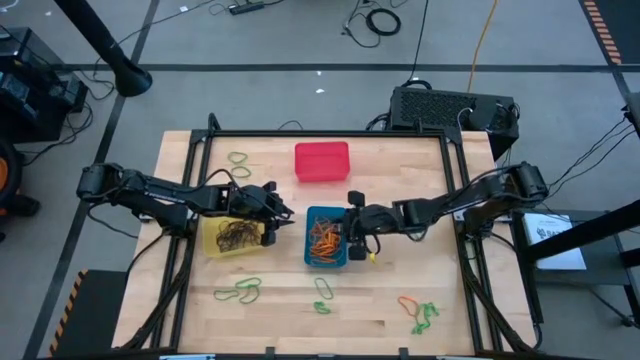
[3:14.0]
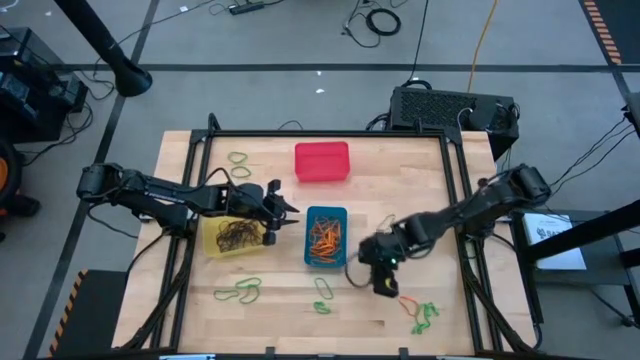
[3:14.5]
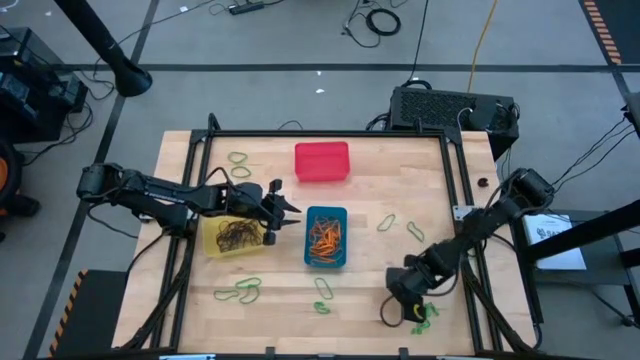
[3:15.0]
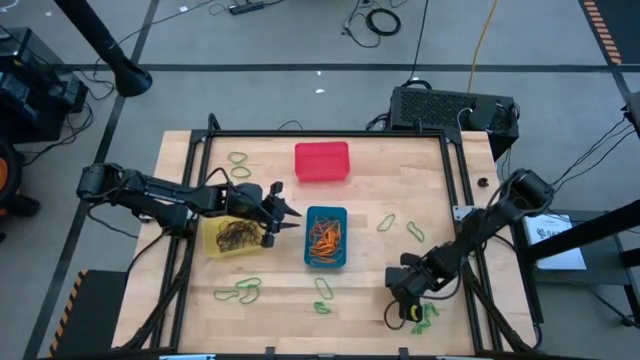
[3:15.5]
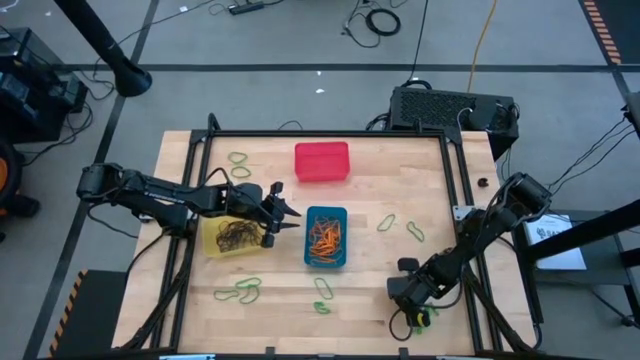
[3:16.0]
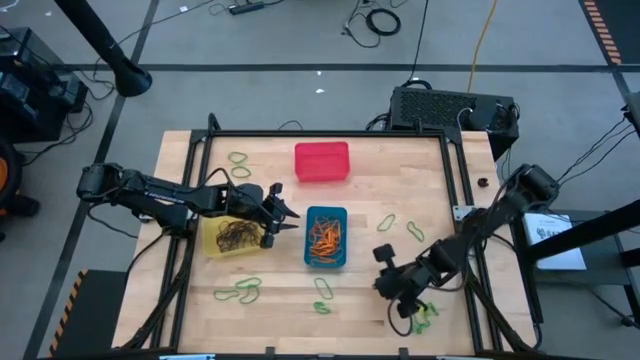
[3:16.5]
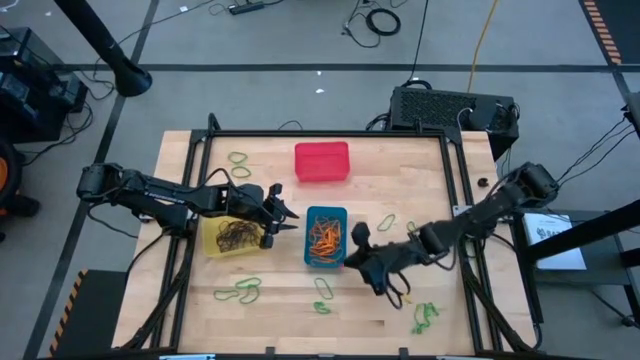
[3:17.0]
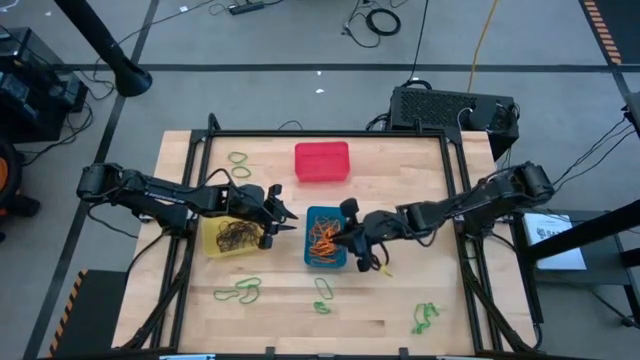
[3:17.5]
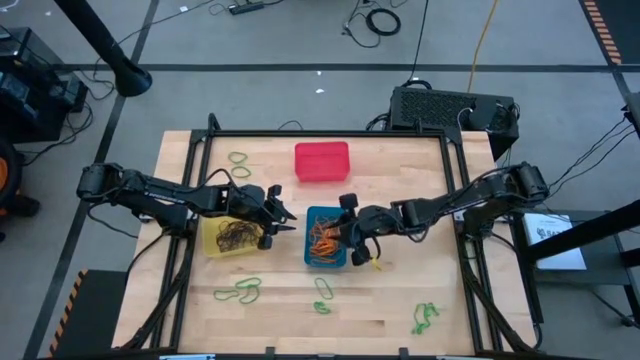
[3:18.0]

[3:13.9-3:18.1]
Task: Sort rubber bands into baskets
Put the orange rubber band into the blue bin

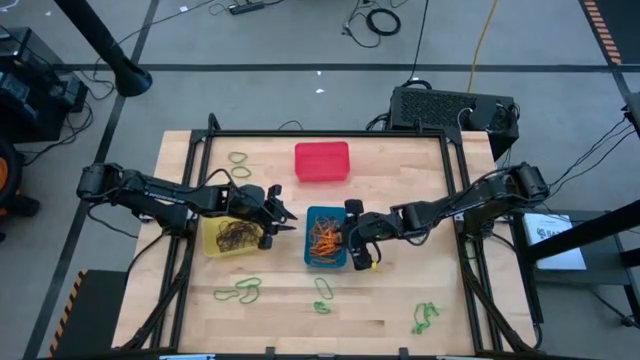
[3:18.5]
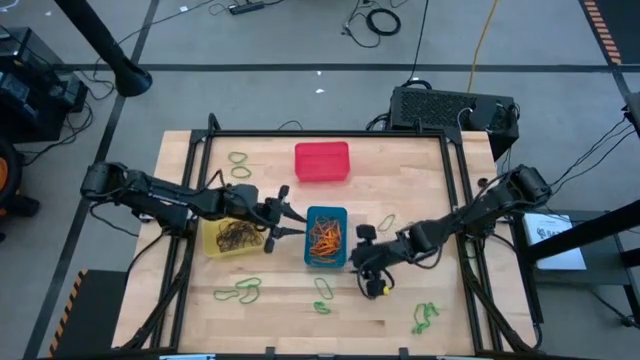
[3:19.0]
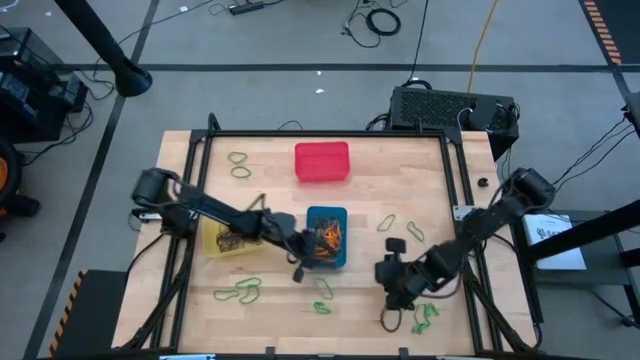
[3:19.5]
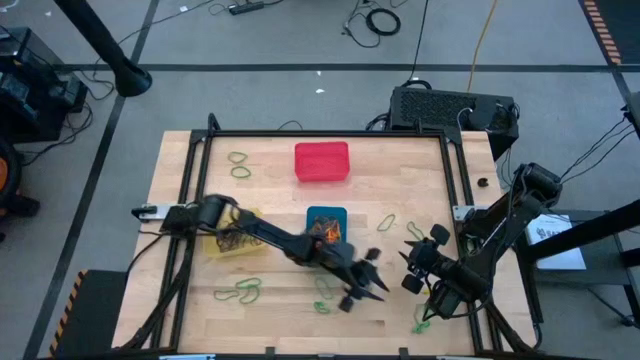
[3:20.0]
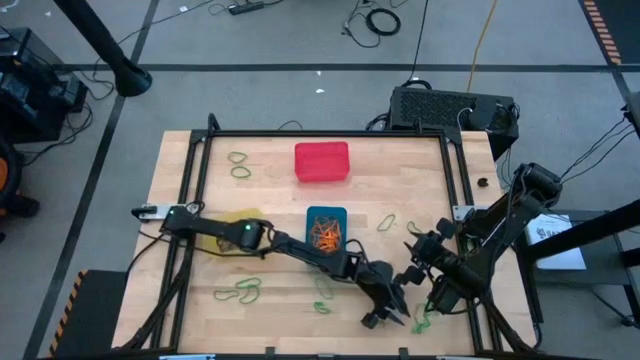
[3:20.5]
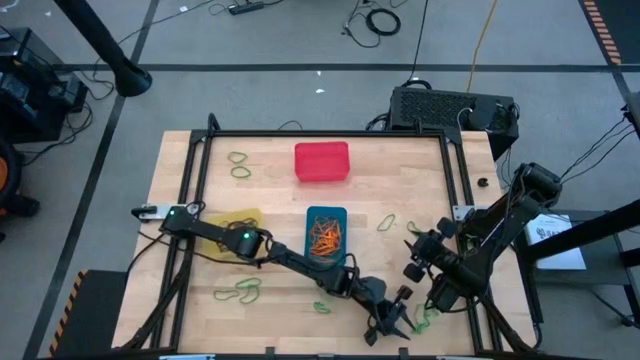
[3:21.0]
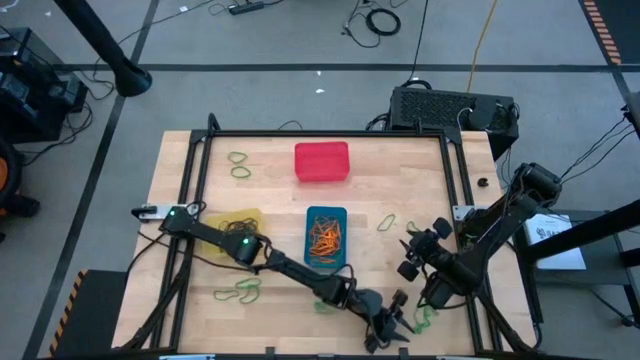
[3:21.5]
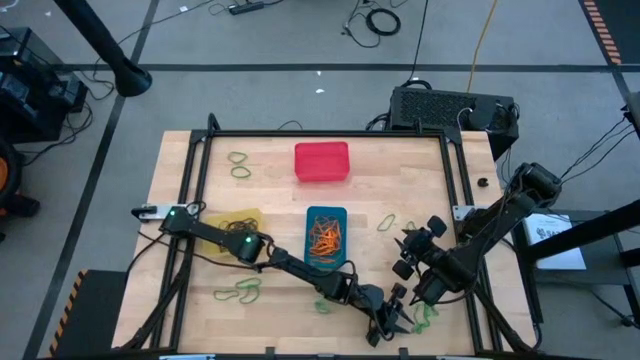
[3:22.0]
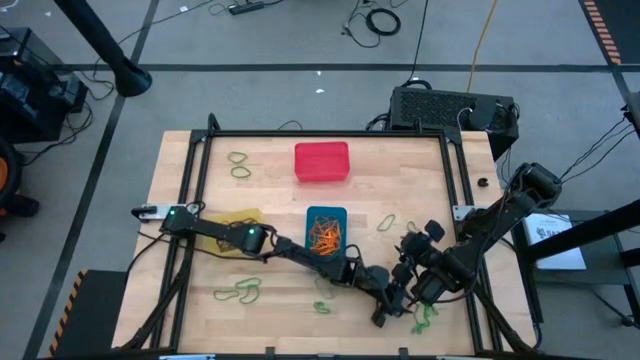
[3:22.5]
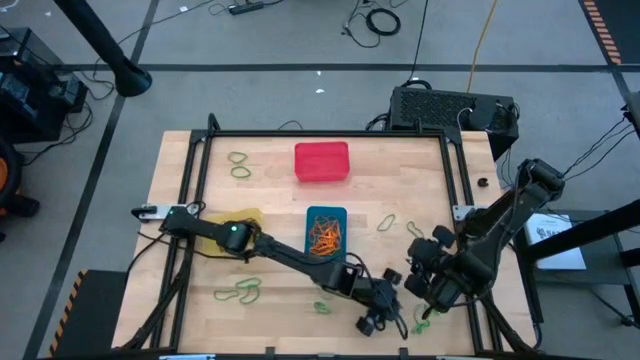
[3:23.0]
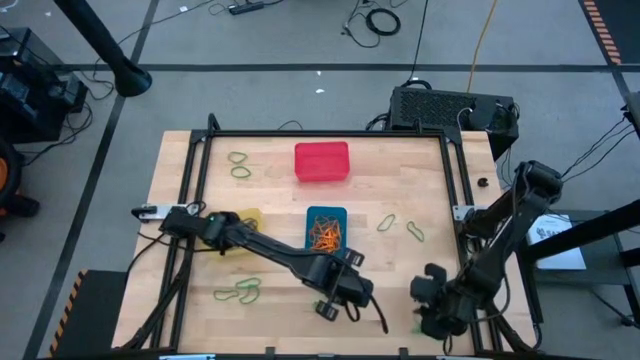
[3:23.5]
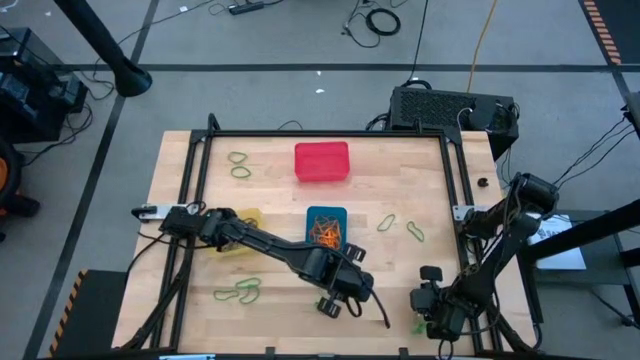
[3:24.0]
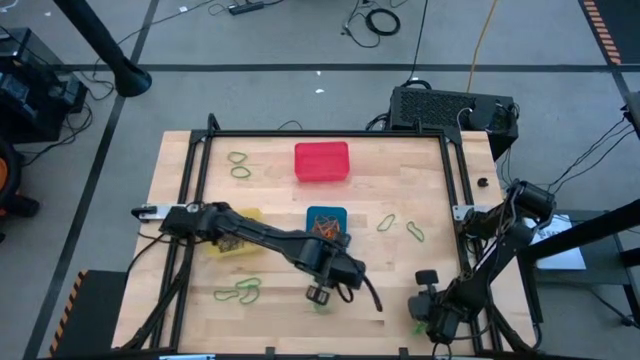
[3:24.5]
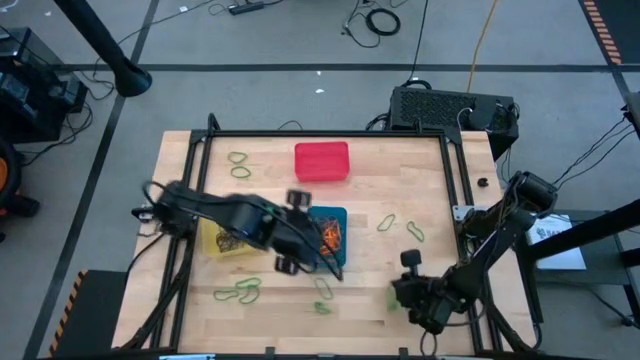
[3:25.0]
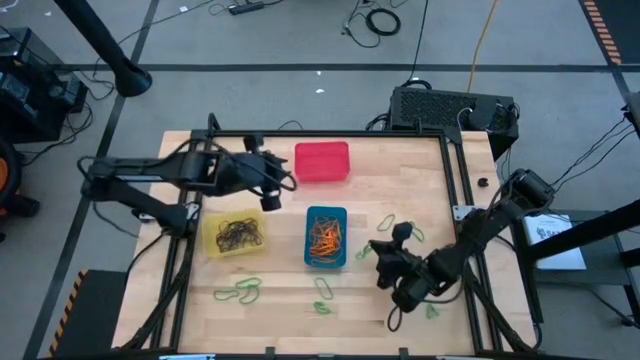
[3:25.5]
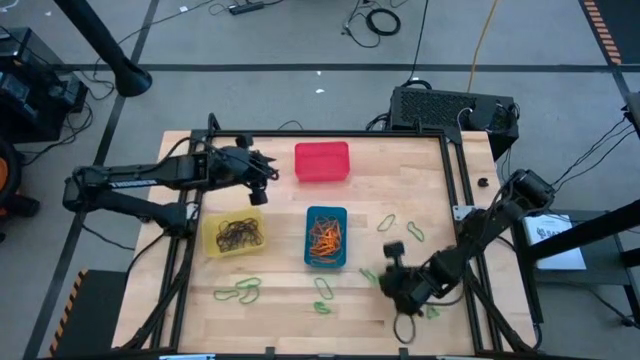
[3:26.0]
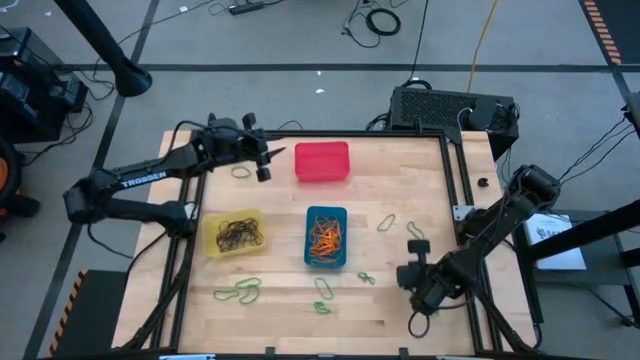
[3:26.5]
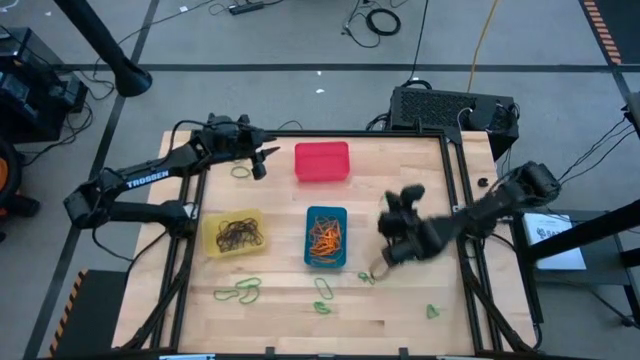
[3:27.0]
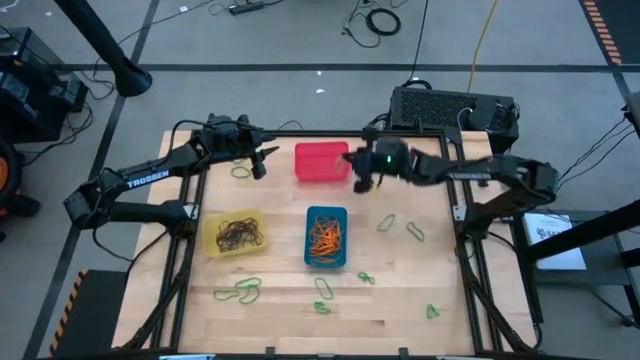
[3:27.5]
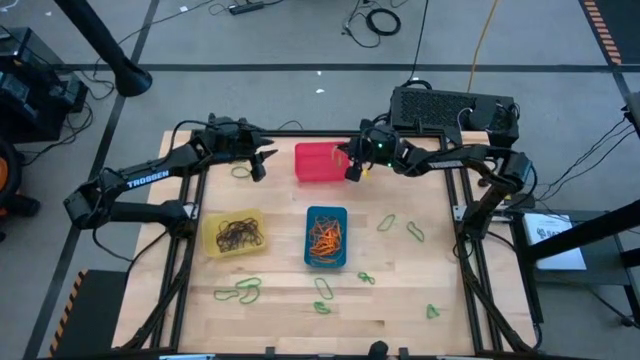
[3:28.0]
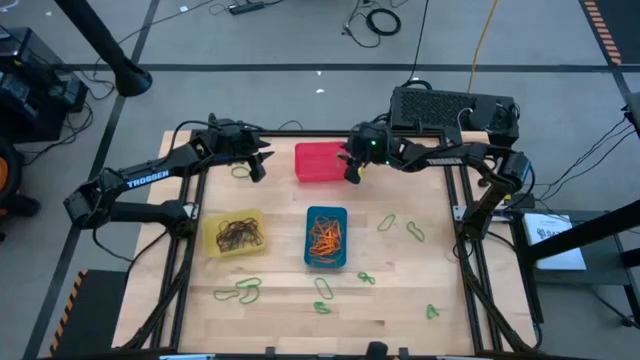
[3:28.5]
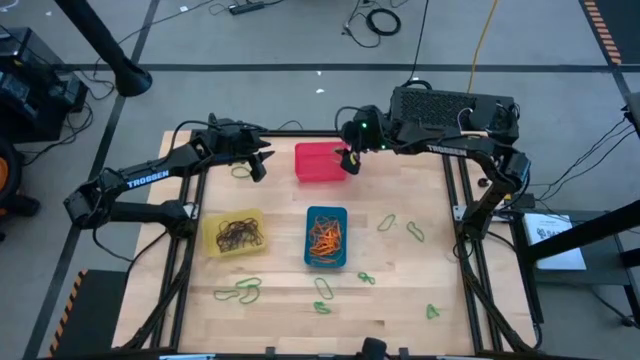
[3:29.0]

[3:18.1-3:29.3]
Put the green rubber band into the red bin

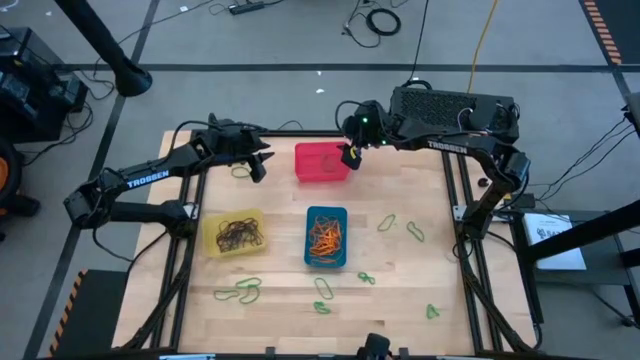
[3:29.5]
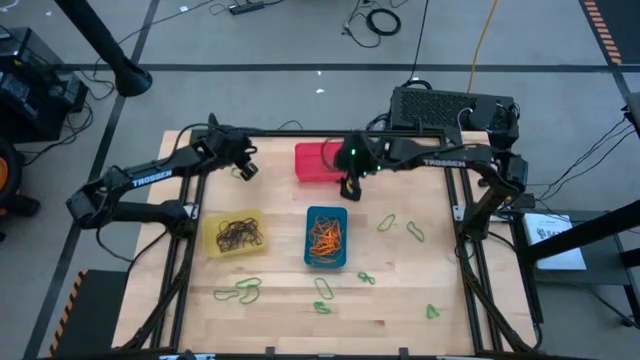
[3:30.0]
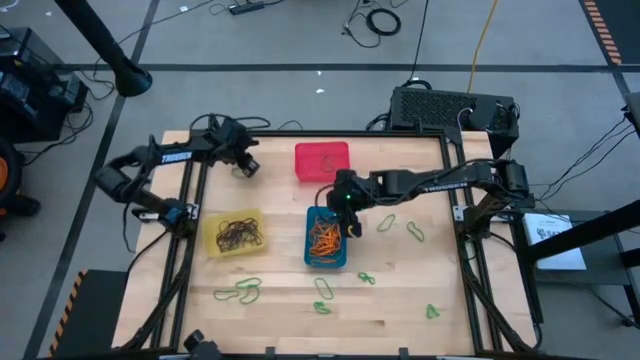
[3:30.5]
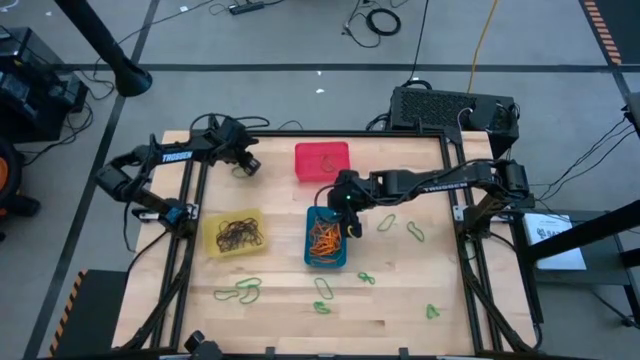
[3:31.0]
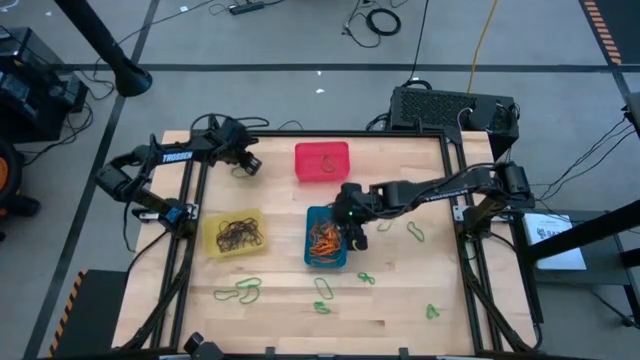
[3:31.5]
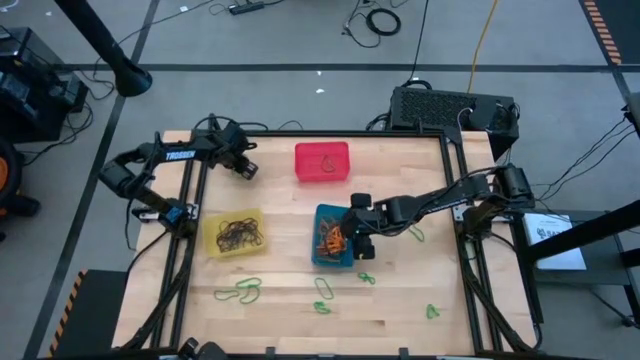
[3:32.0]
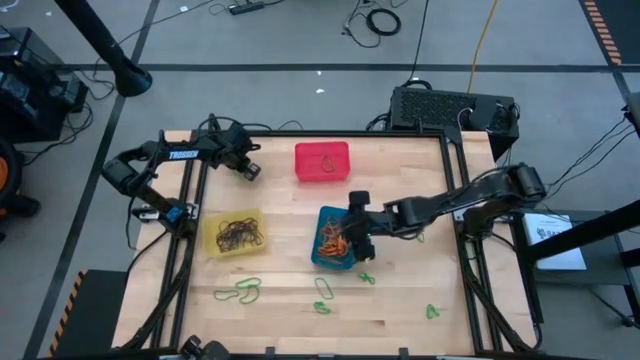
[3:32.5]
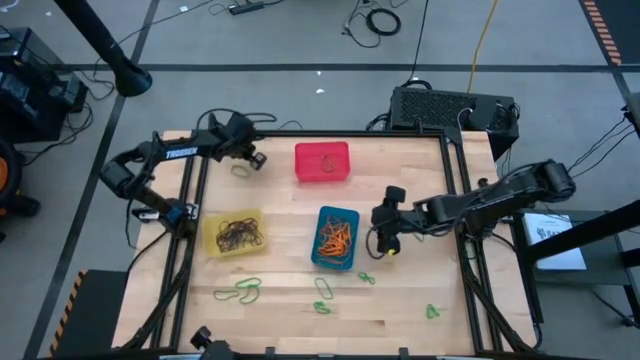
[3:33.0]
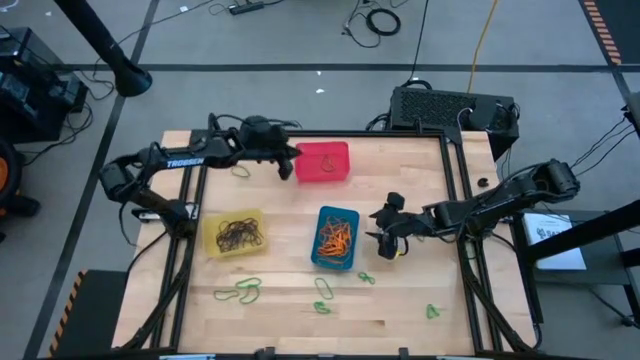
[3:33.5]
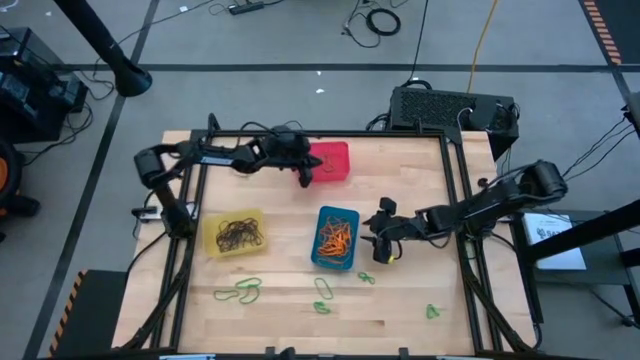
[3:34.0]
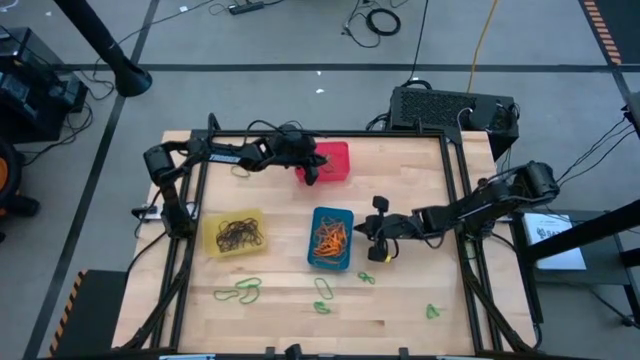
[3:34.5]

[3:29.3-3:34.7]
Put the green rubber band into the red bin

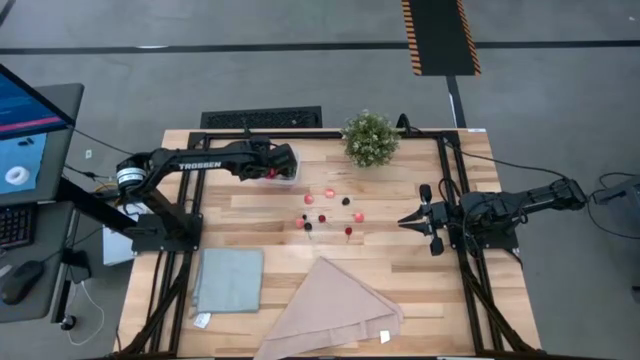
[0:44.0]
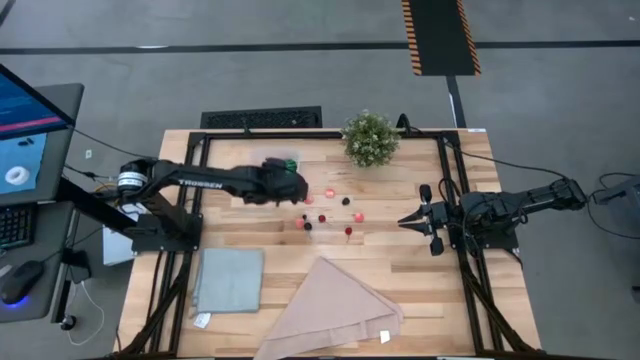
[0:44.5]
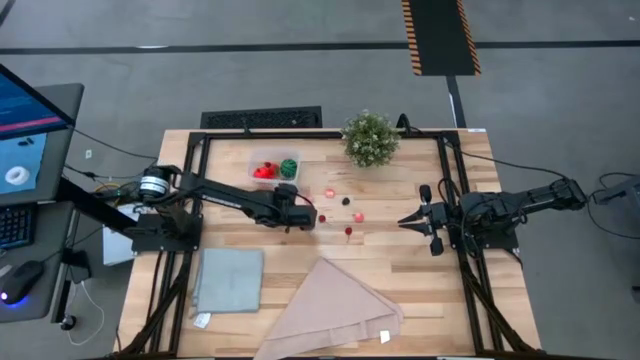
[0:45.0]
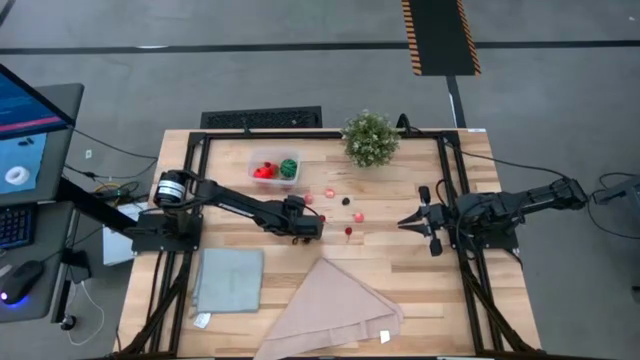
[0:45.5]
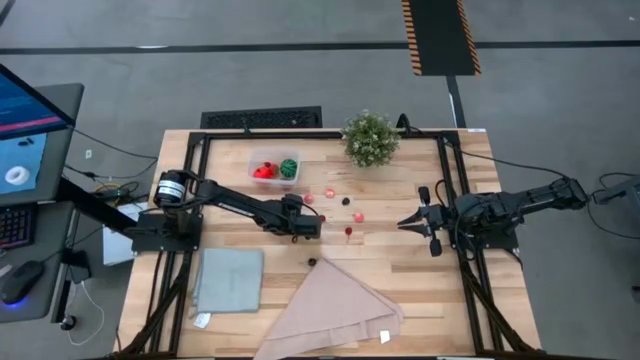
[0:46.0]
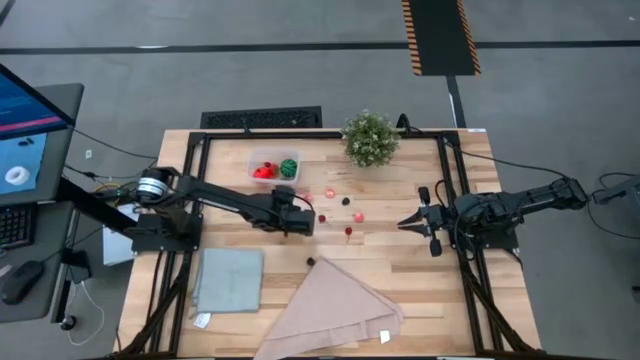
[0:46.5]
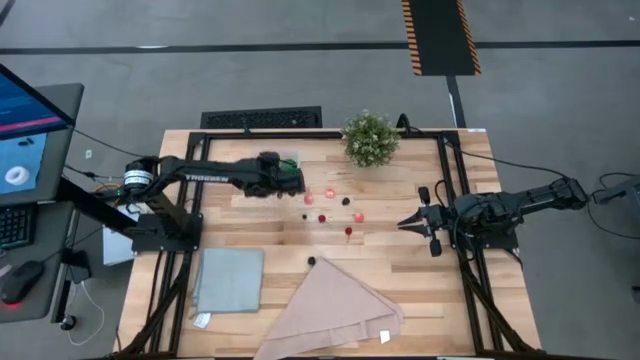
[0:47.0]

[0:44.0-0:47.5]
Task: Pick and placing Produce into tupperware
Put the pink peach into the transparent container
